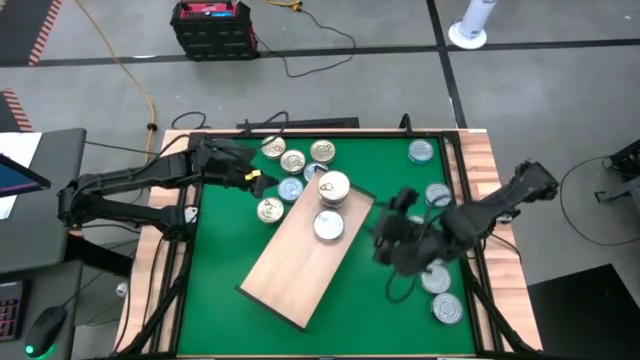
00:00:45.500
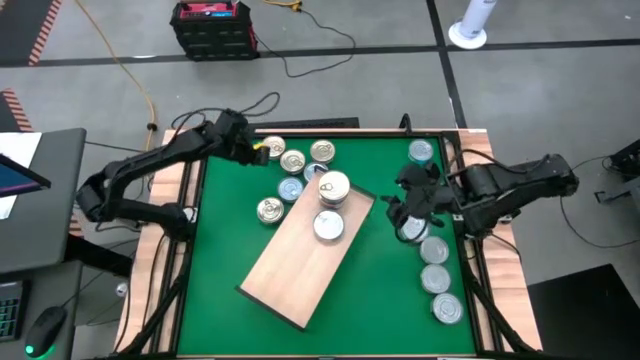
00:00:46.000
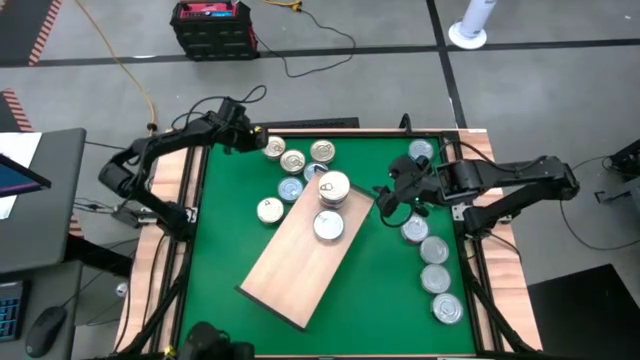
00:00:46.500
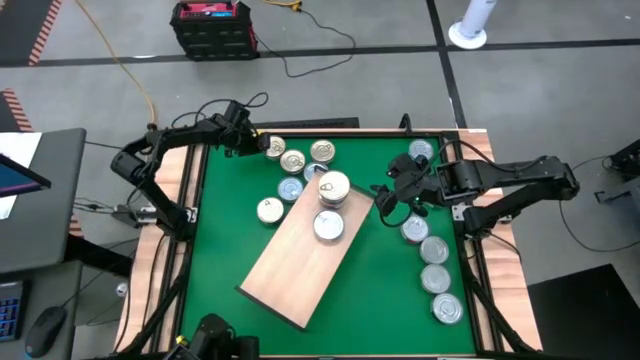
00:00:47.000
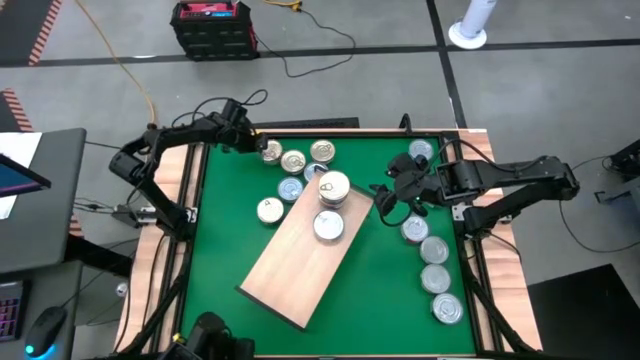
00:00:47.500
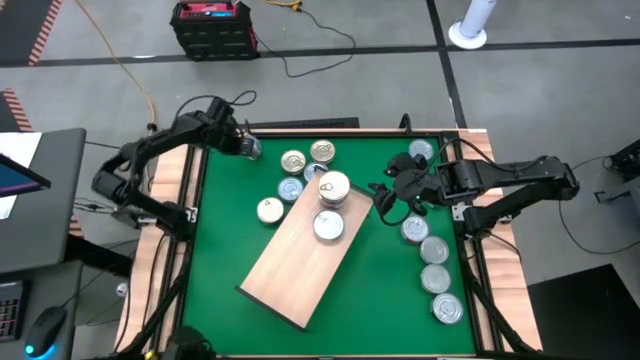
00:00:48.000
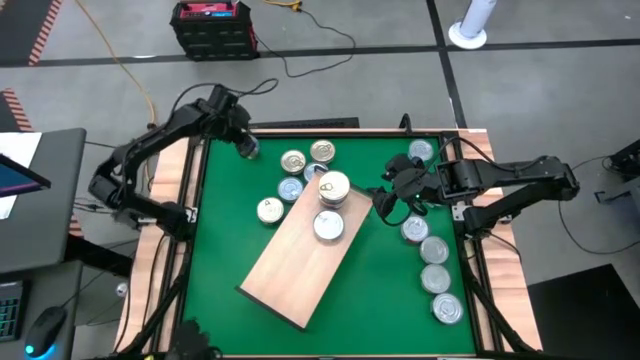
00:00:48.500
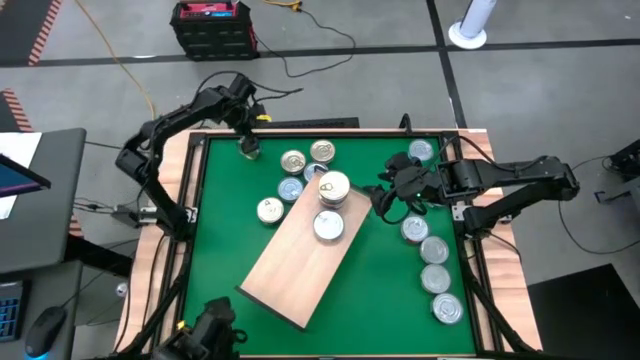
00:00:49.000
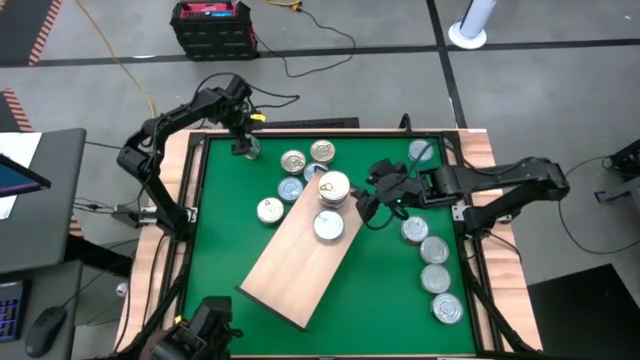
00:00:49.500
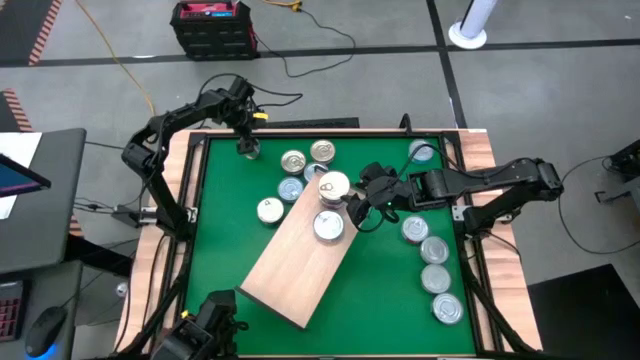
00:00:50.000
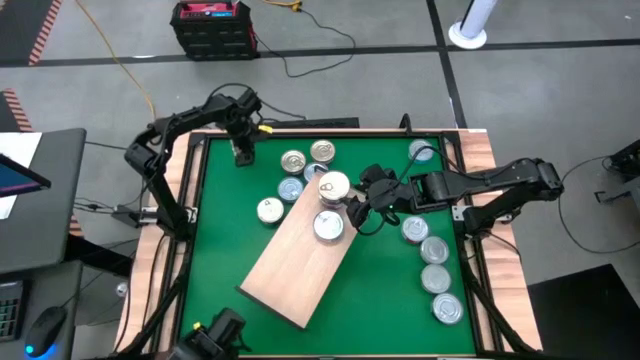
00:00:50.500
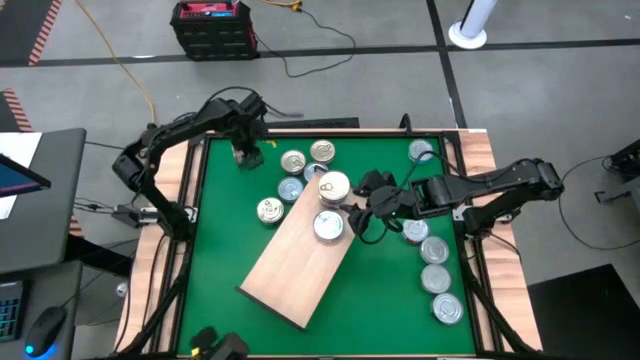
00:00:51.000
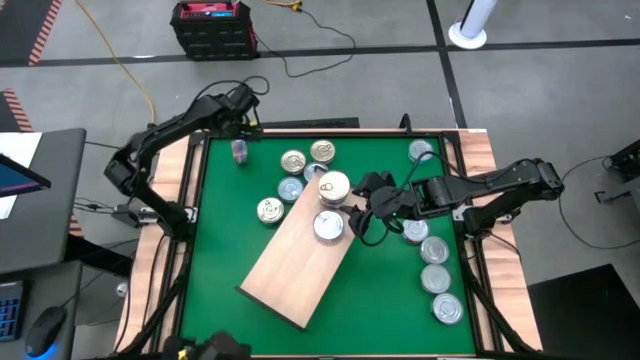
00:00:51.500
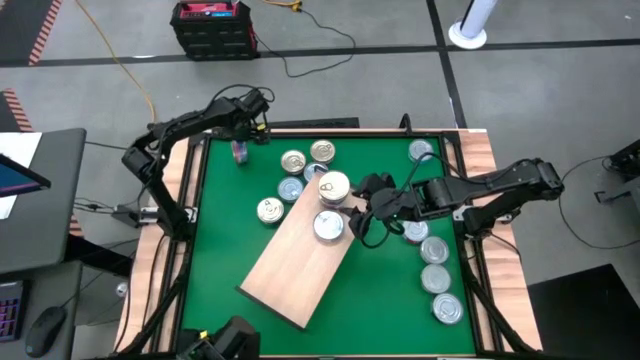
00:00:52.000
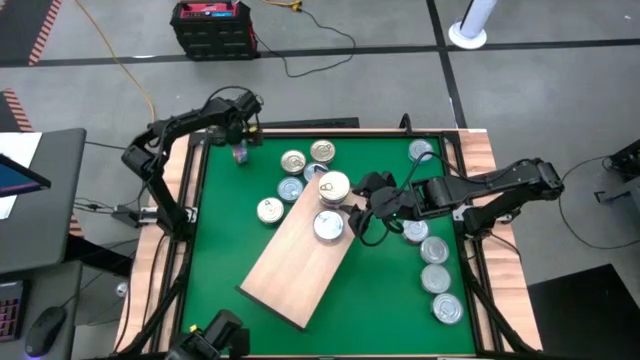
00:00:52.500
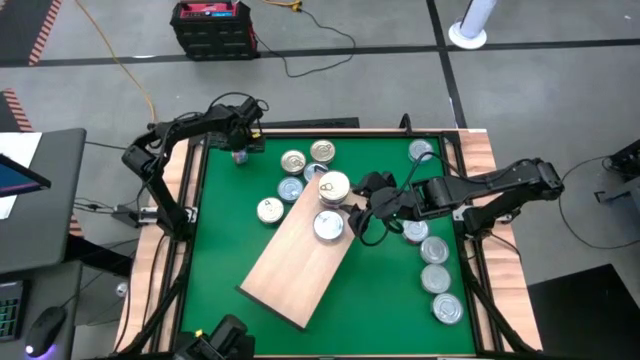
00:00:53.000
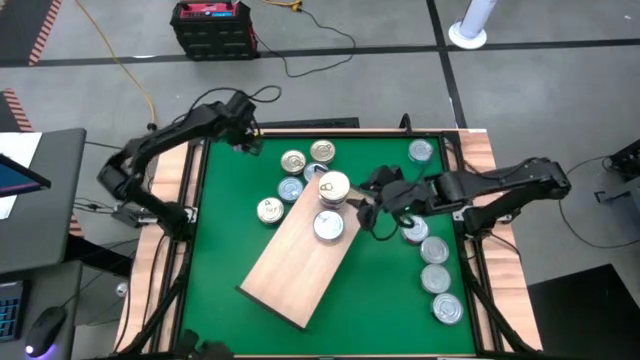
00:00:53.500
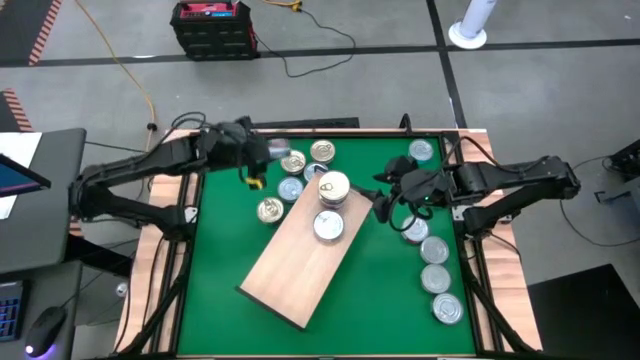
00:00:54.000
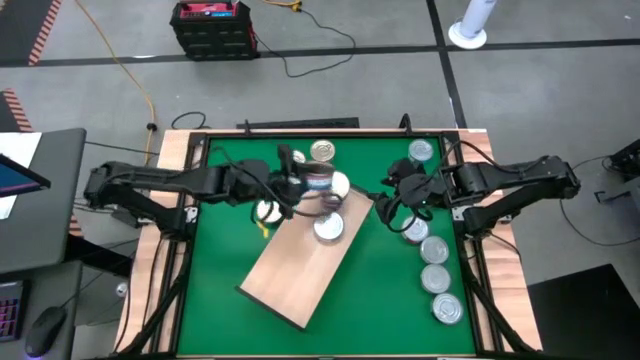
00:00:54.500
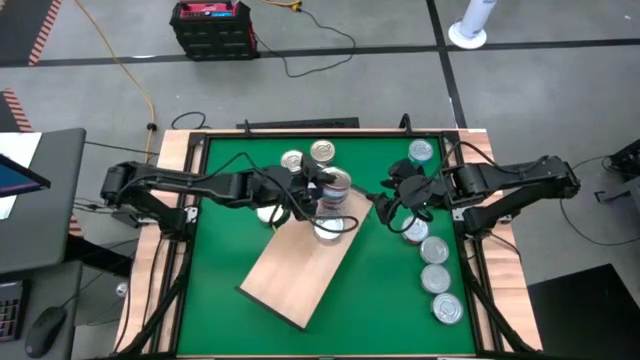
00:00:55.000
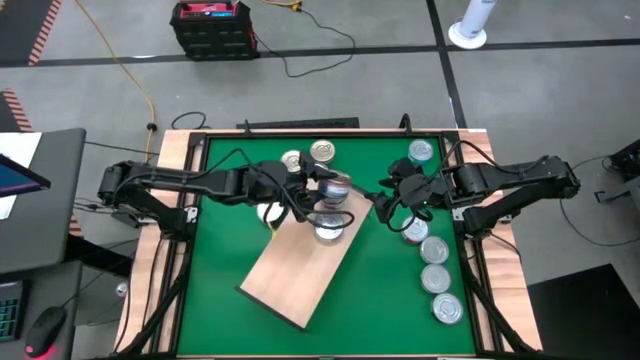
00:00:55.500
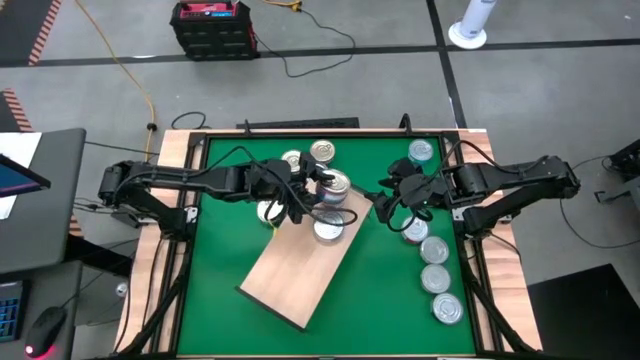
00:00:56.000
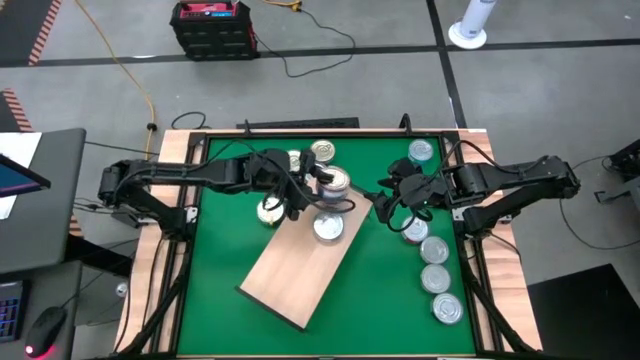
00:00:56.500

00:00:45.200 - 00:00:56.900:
Task: Stack canned seafood by type on shelf
Stack the blue pink tuna can on top of the other blue pink tuna cans on the shelf

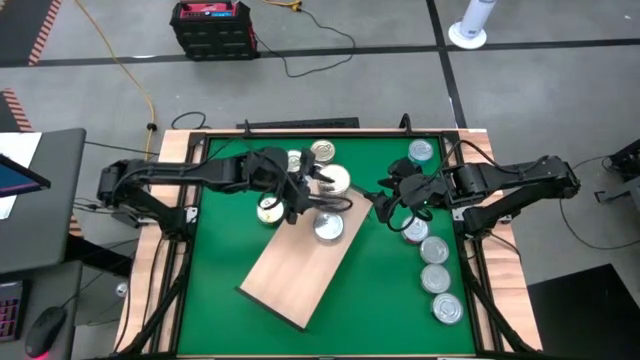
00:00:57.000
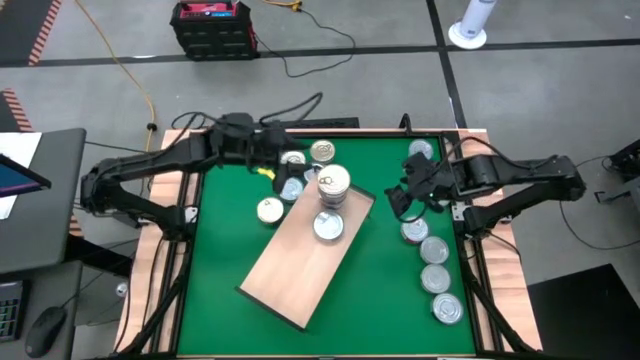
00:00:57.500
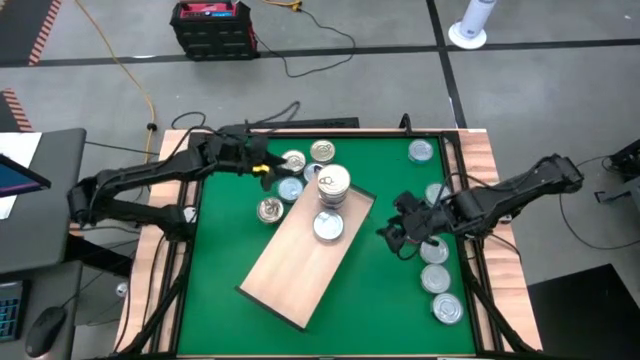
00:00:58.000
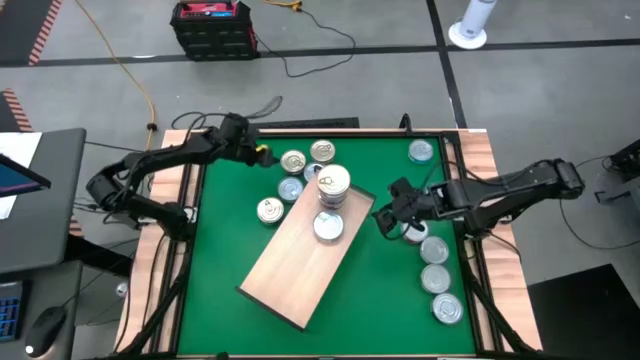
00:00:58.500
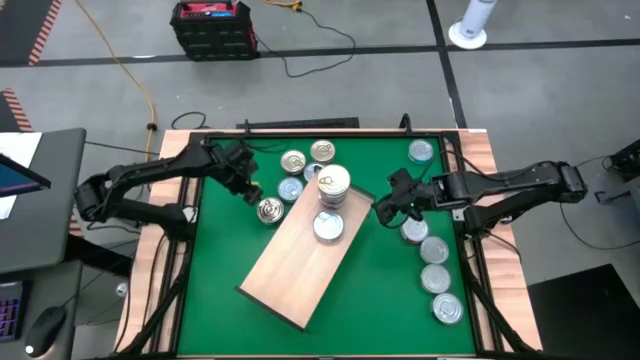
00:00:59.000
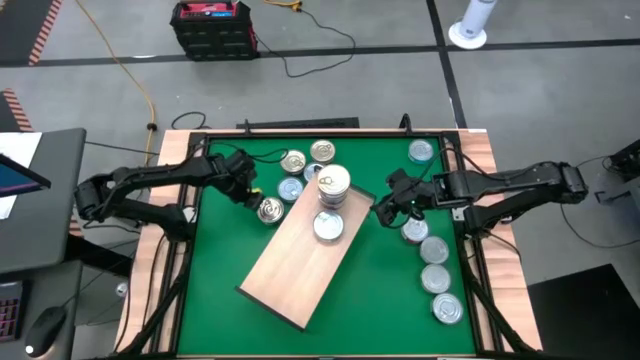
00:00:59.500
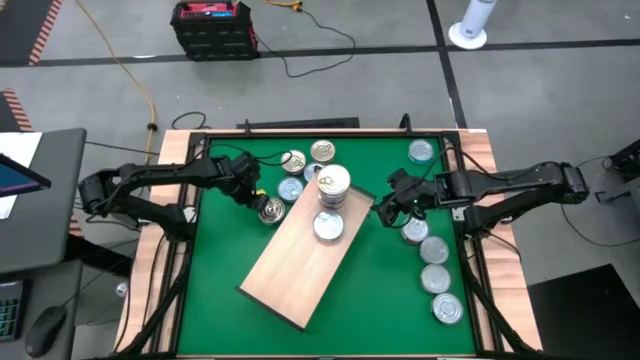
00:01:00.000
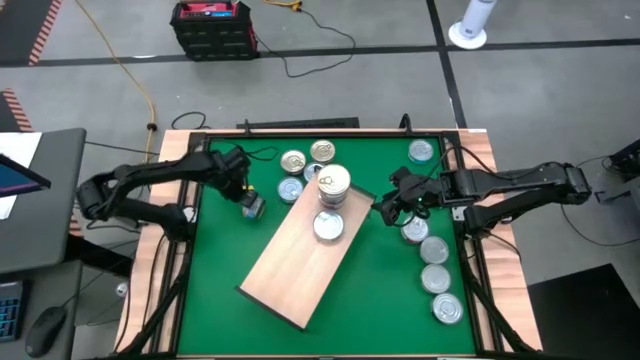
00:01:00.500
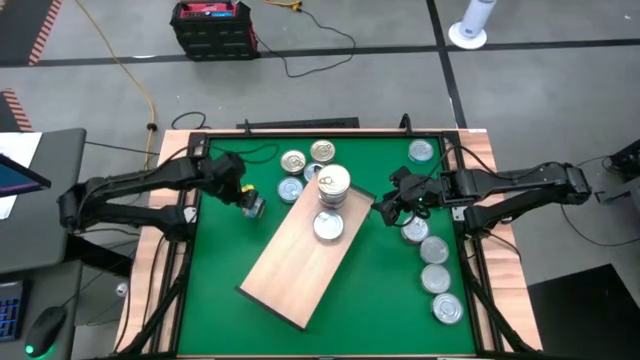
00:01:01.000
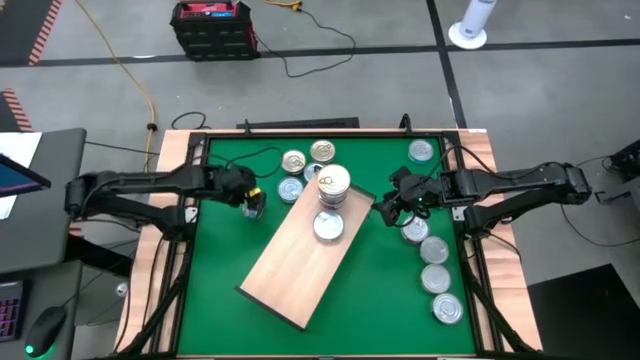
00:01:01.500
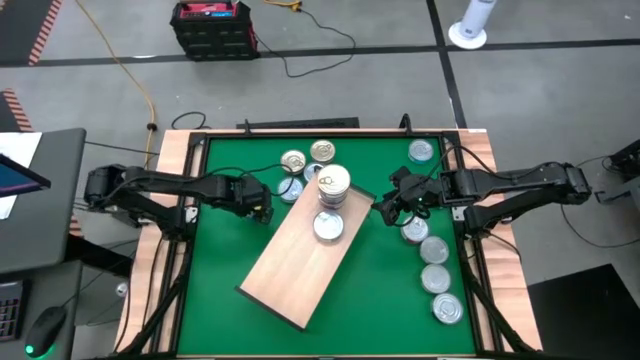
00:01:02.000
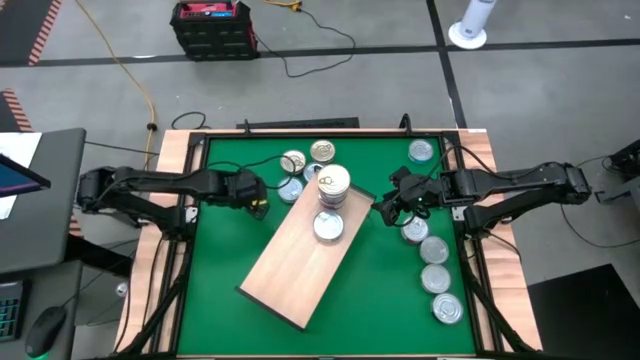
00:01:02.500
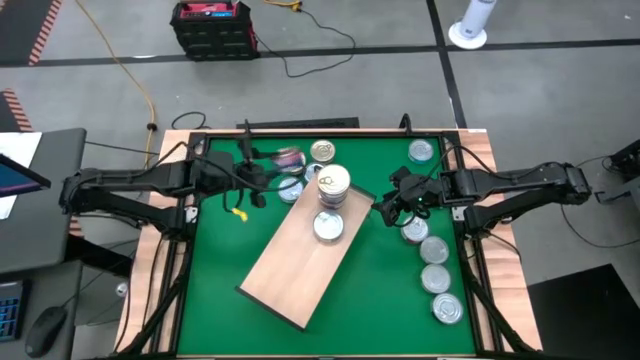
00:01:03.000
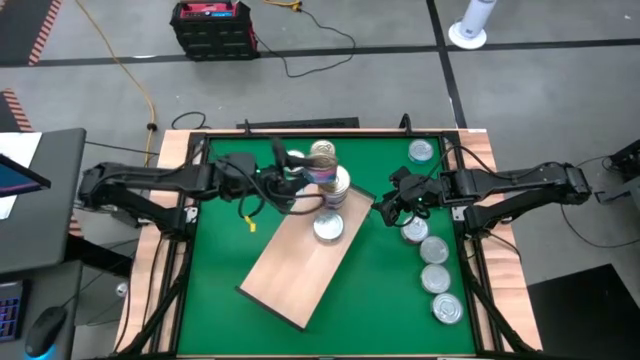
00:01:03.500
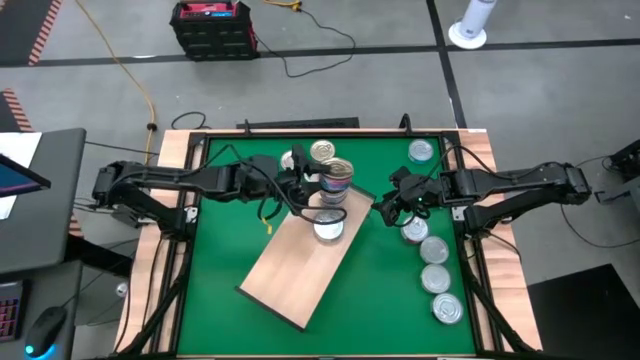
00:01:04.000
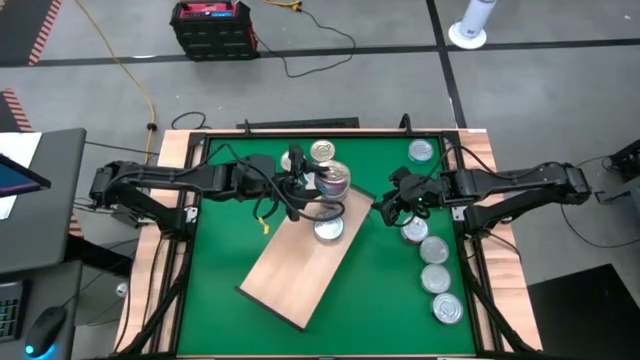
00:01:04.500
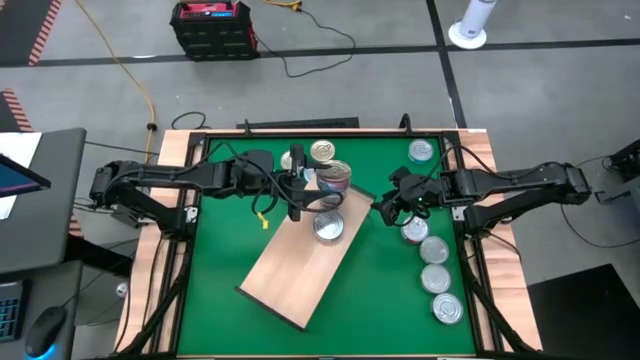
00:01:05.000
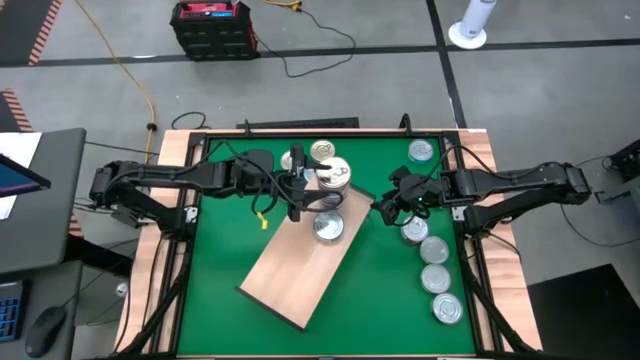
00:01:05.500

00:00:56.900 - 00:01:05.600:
Stack the blue pink tuna can on top of the other blue pink tuna cans on the shelf
